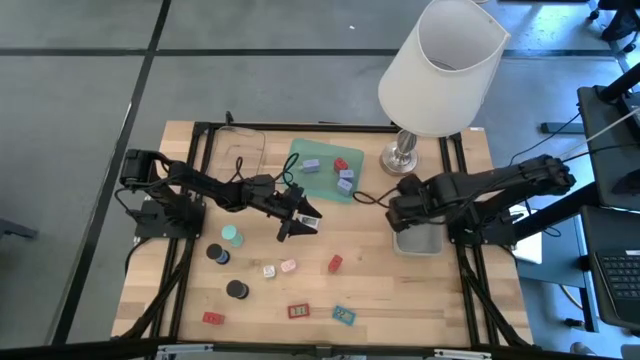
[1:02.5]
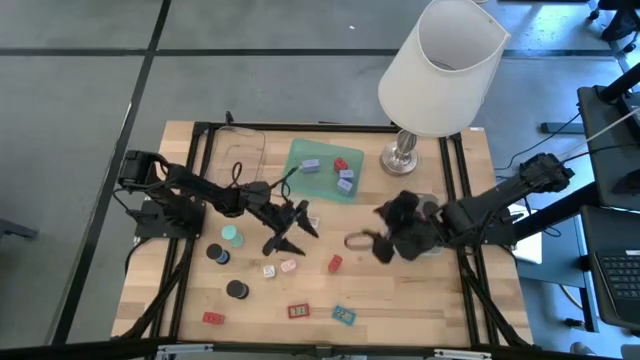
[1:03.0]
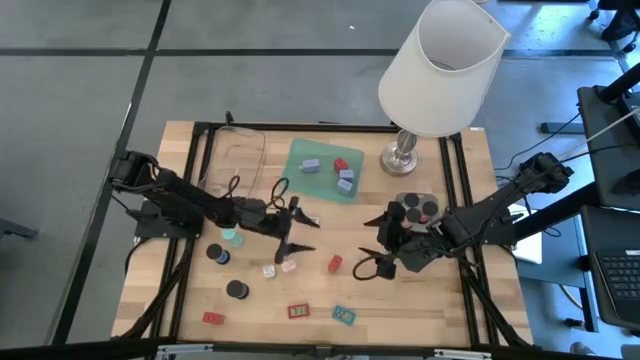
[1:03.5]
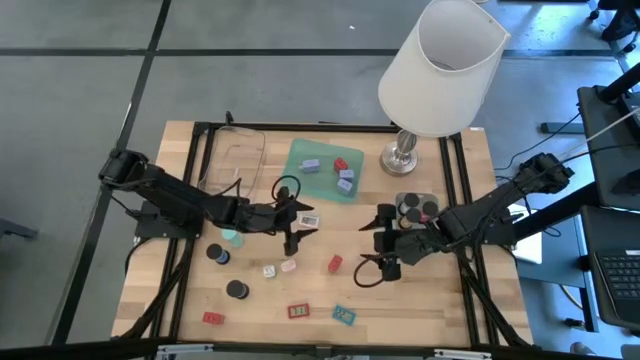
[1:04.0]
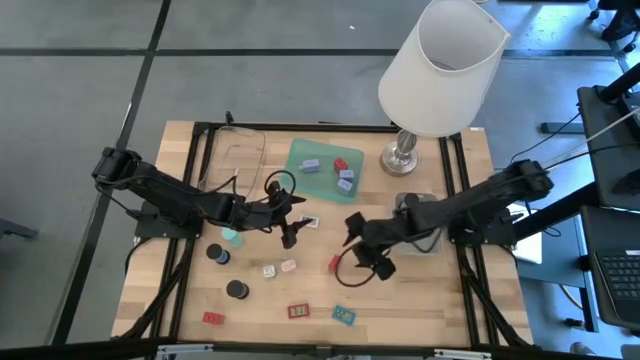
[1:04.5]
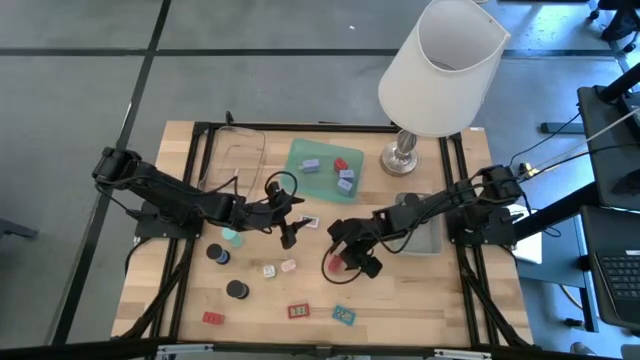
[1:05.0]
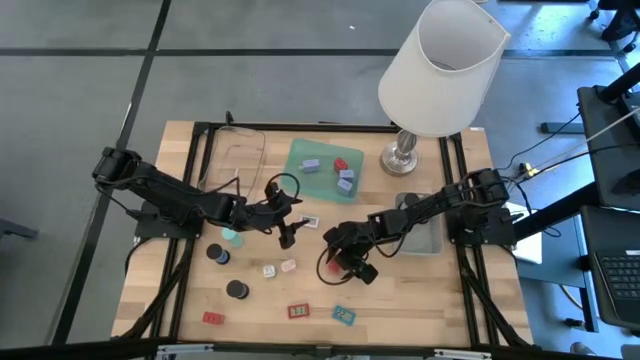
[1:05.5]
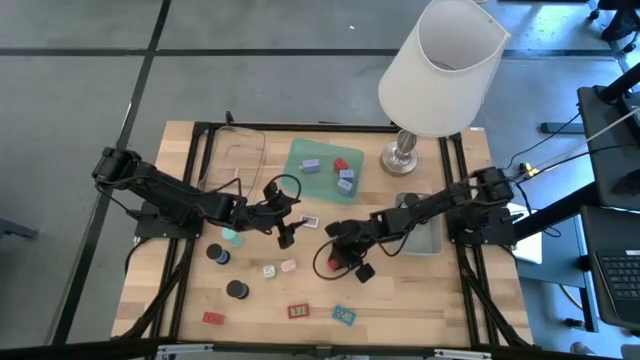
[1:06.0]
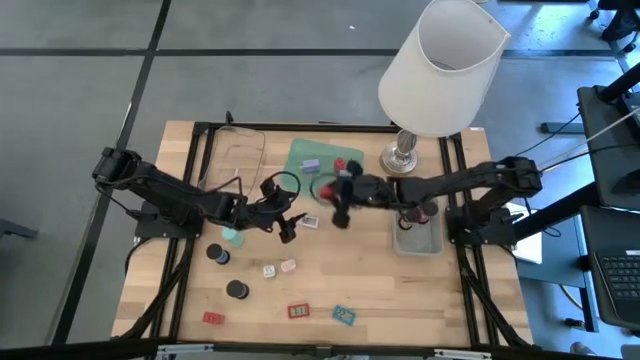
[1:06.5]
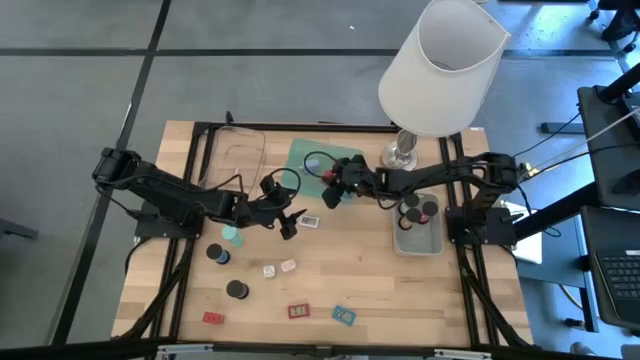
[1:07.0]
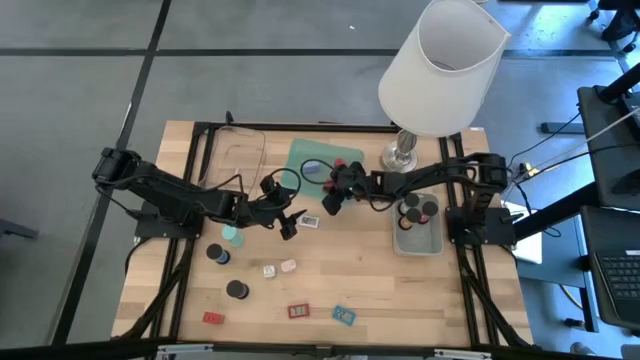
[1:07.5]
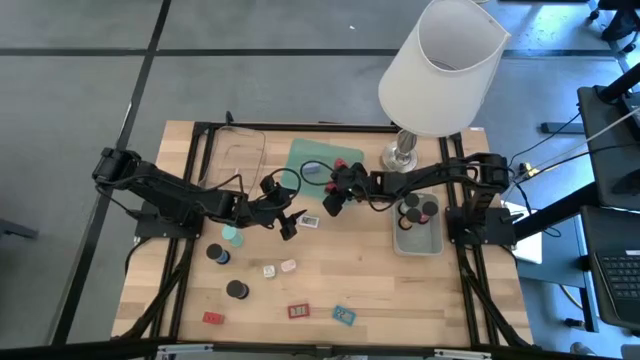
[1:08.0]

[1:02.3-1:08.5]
Task: Pick & Place Office items
Put the right red charger adapter into the green bin

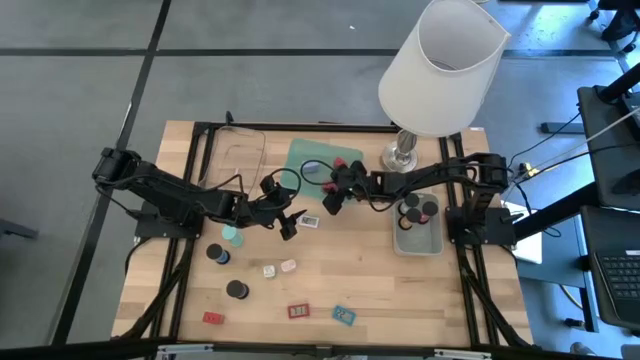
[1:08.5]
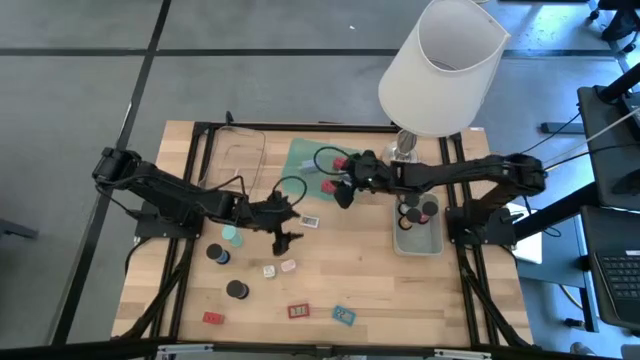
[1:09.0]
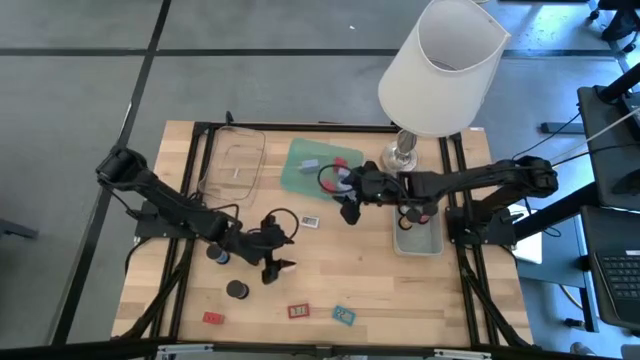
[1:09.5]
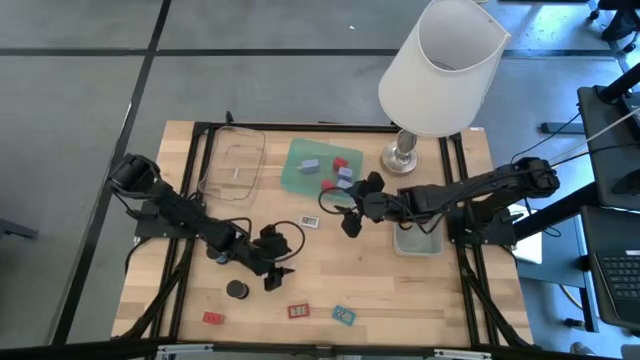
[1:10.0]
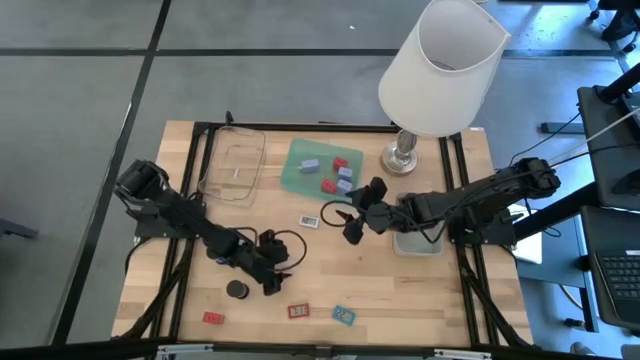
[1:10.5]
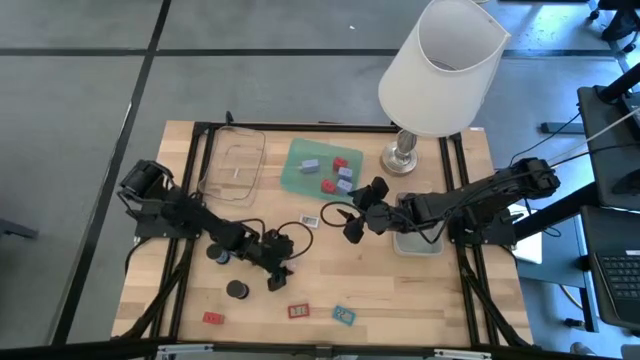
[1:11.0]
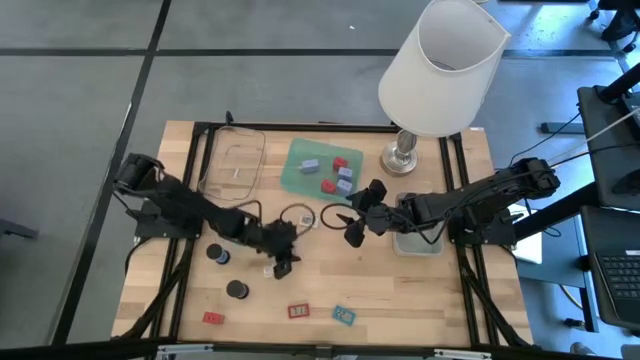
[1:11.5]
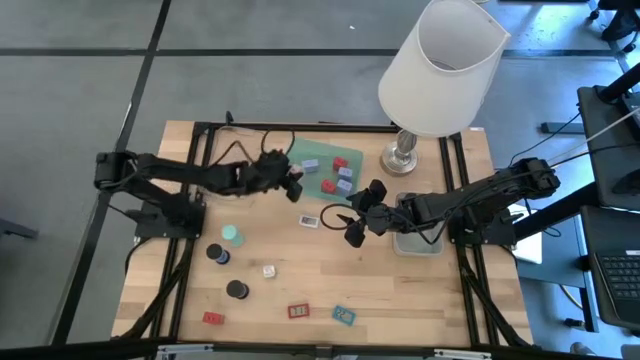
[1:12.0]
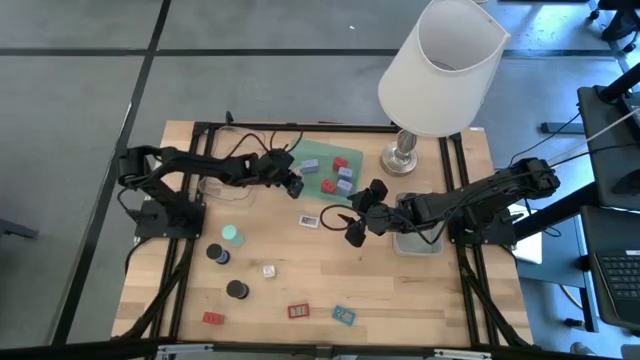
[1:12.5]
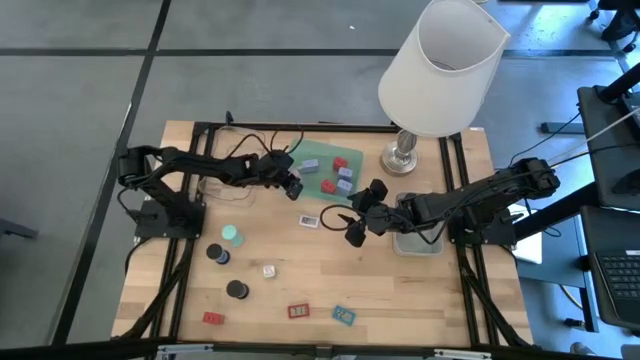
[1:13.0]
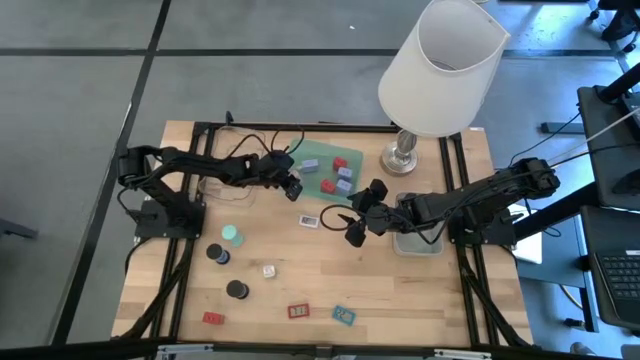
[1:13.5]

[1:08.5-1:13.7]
Put the white charger adapter into the green bin

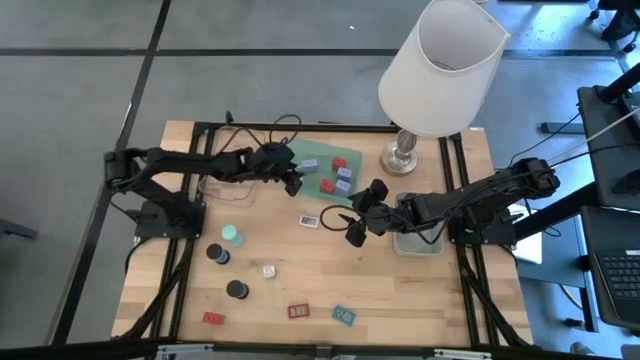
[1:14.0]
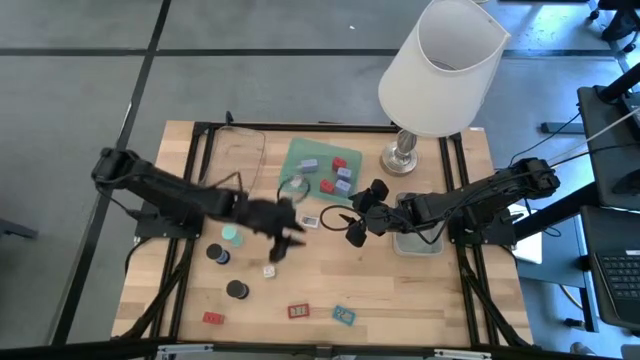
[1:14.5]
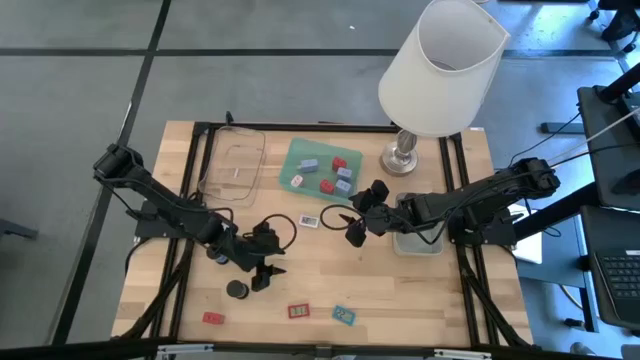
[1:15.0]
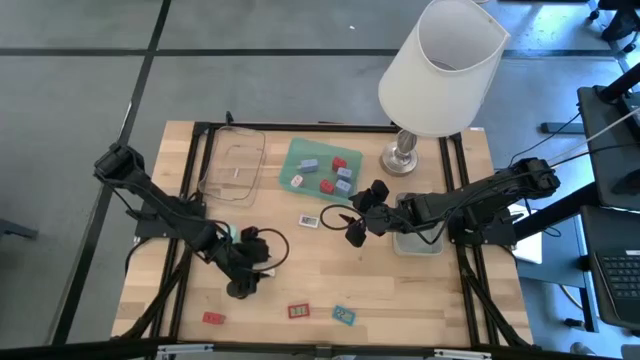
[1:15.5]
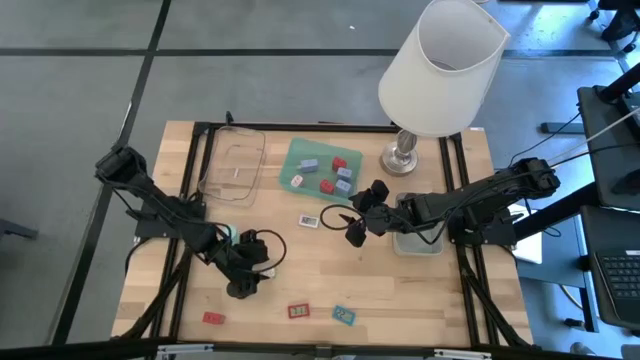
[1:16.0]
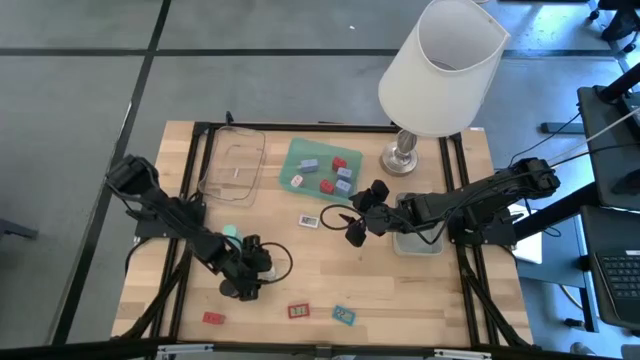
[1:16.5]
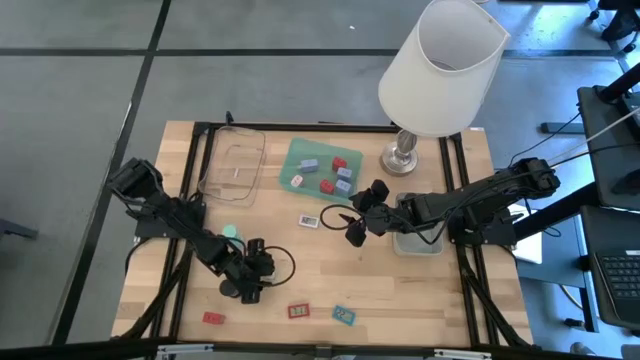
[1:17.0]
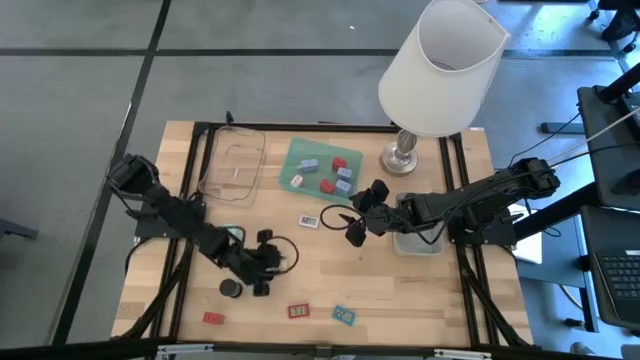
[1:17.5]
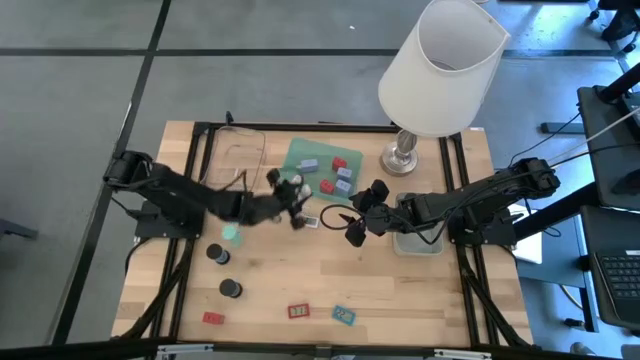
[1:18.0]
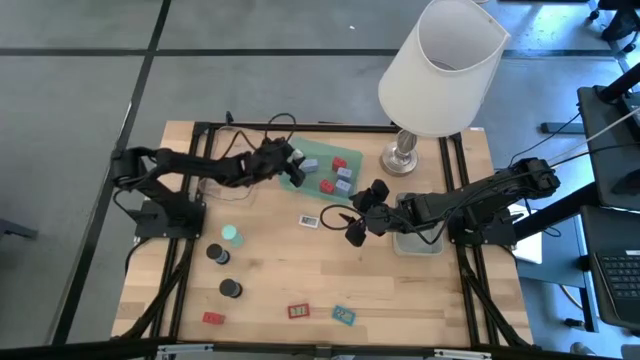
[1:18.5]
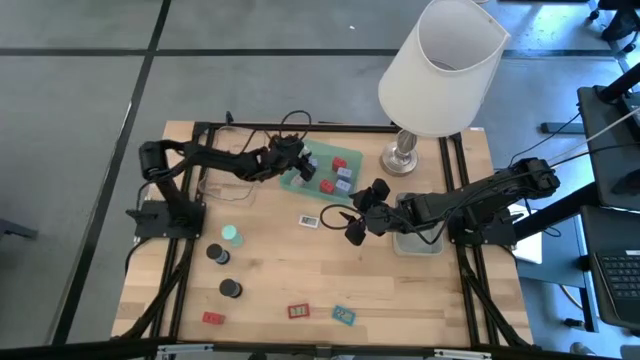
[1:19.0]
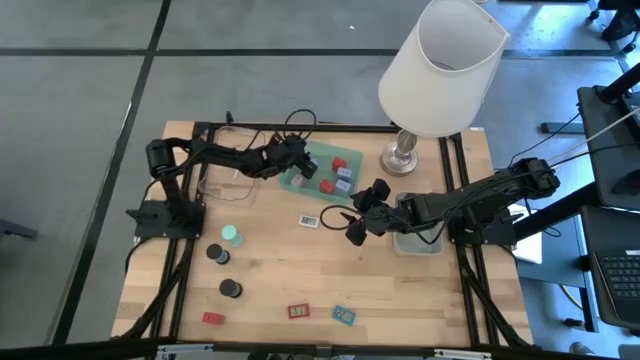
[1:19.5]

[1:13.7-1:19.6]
Put the green charger adapter into the green bin

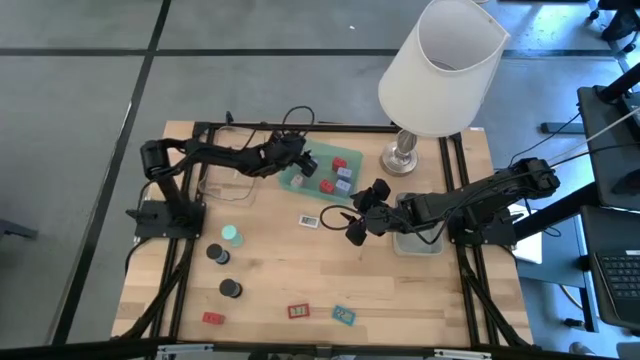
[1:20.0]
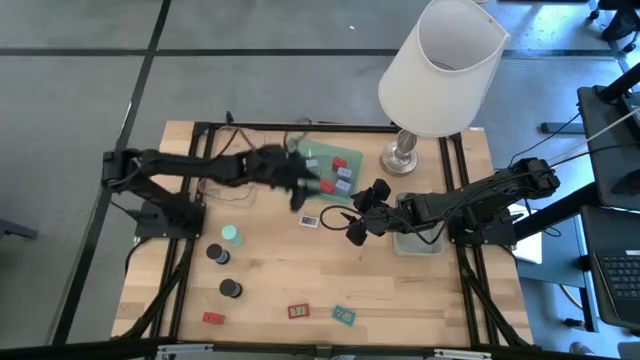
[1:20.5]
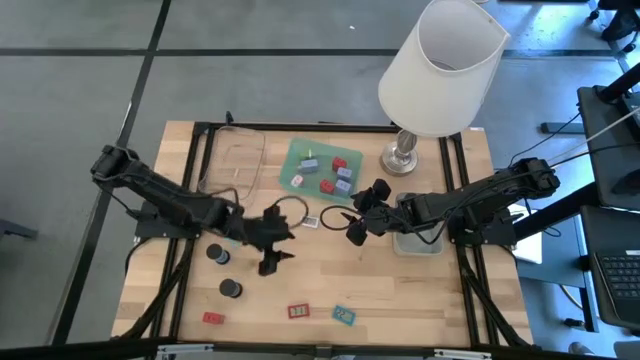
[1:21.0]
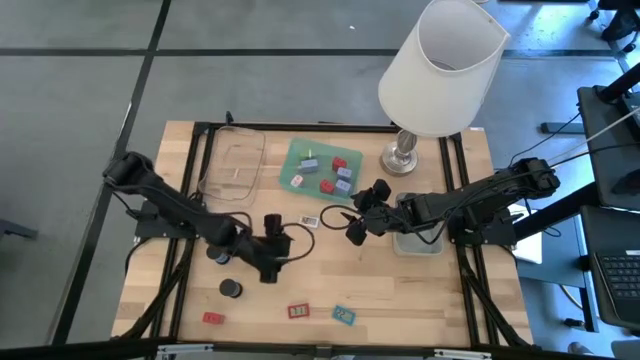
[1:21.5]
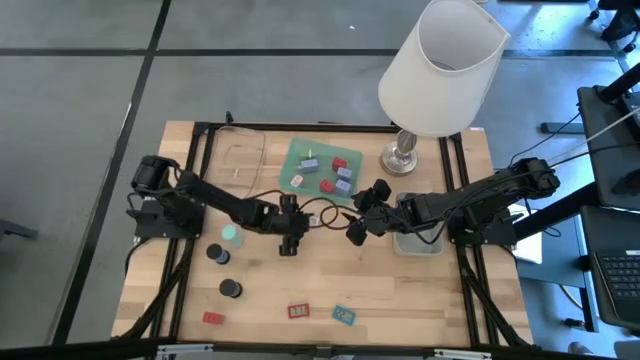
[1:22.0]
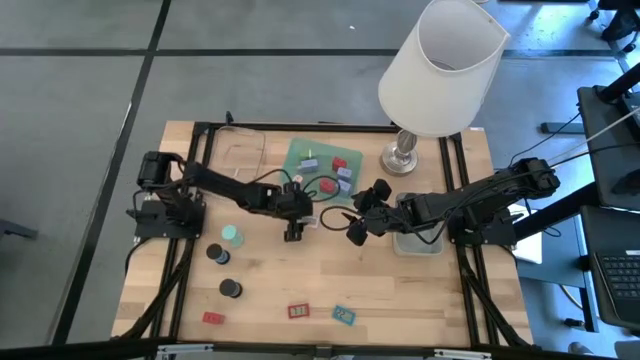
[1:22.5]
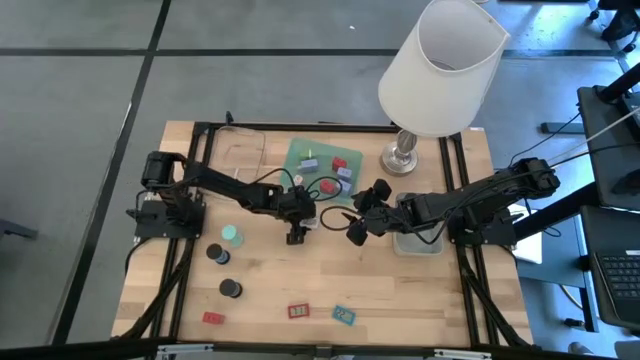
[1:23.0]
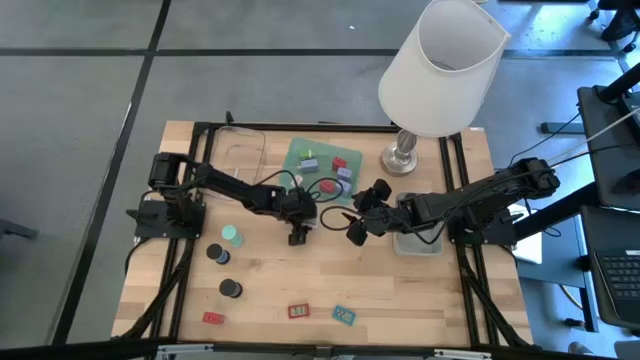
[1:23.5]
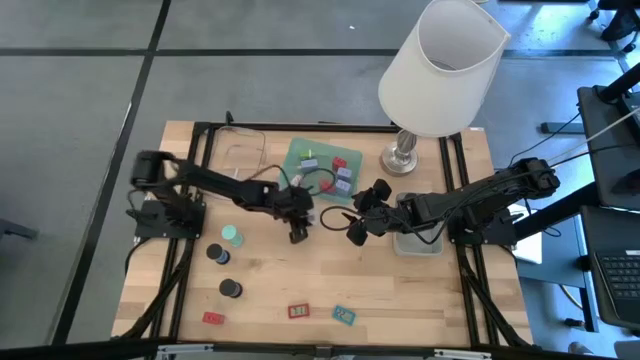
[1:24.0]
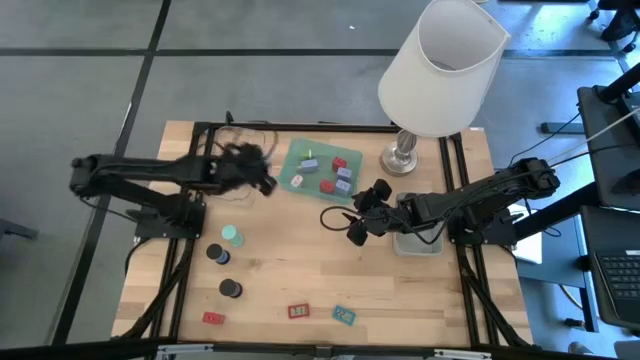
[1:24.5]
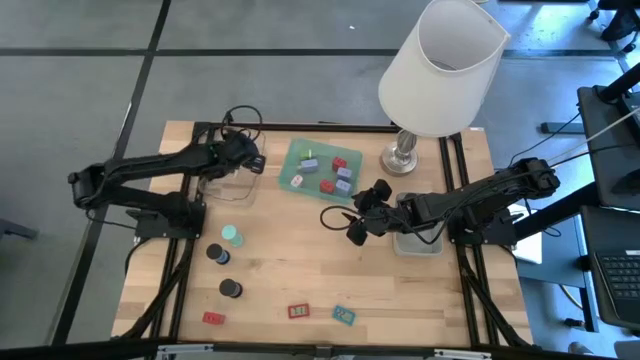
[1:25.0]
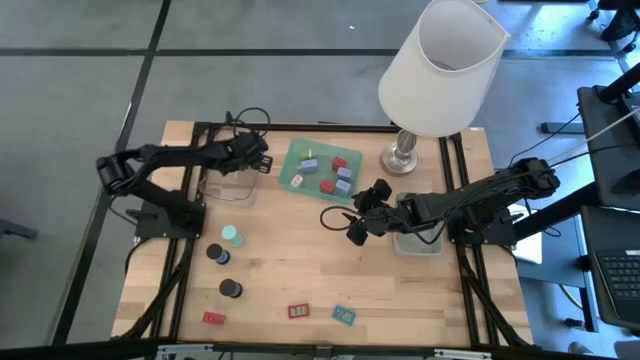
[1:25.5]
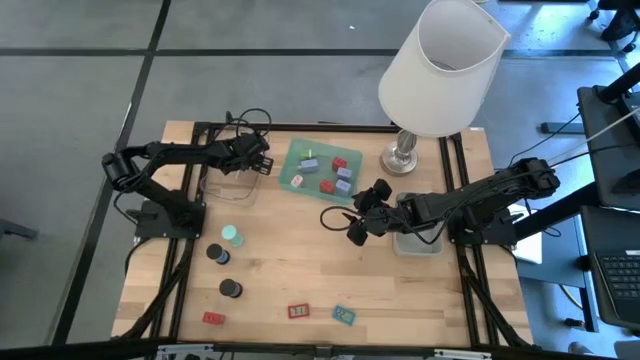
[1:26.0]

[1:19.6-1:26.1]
Put the white timer into the transparent bin
